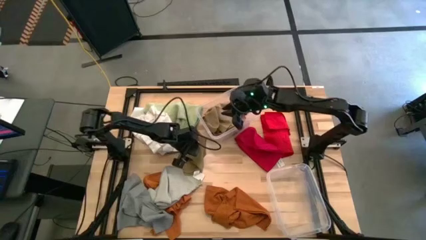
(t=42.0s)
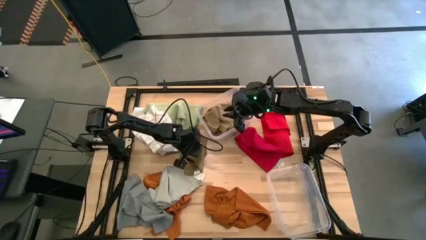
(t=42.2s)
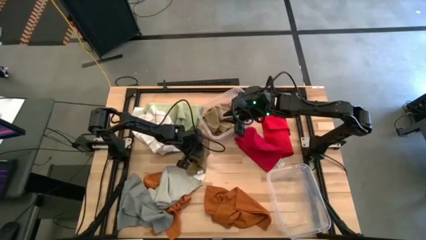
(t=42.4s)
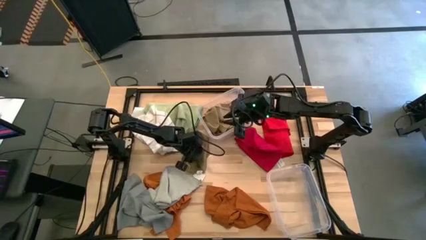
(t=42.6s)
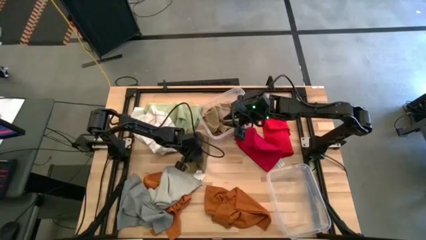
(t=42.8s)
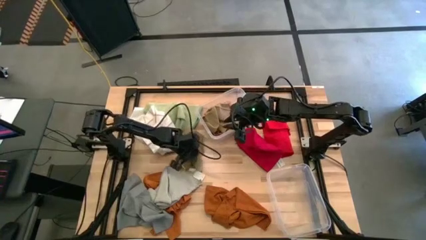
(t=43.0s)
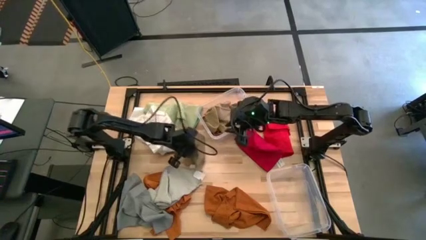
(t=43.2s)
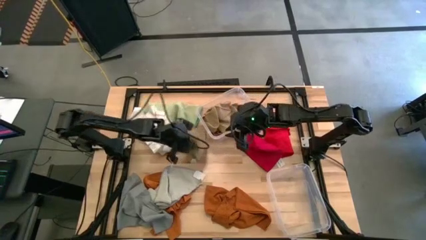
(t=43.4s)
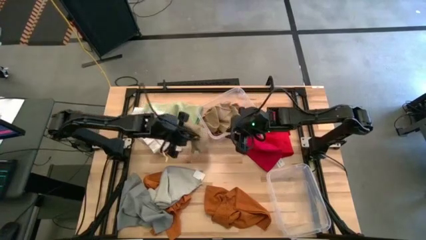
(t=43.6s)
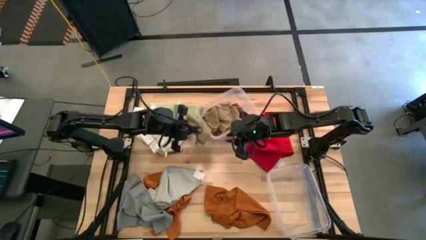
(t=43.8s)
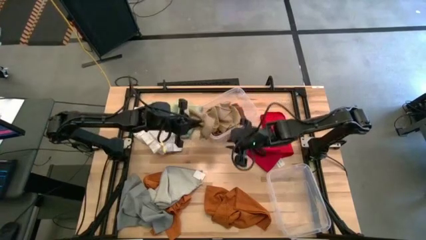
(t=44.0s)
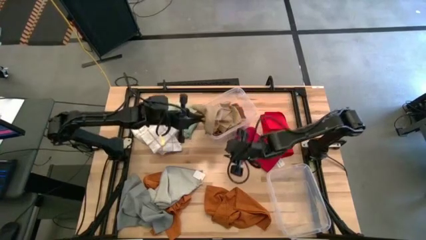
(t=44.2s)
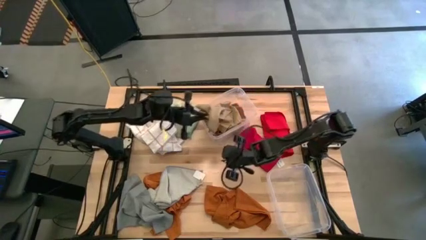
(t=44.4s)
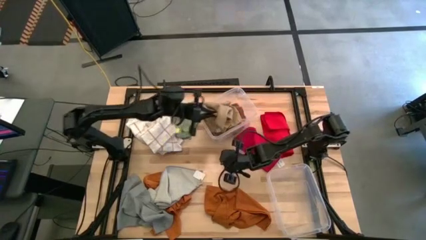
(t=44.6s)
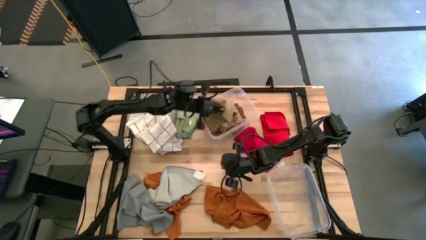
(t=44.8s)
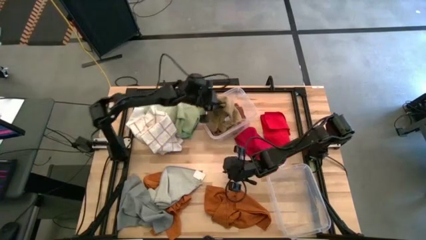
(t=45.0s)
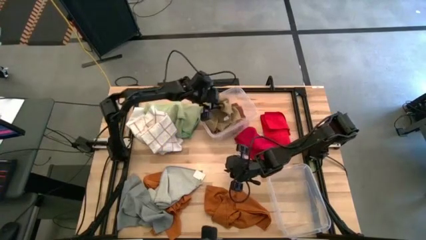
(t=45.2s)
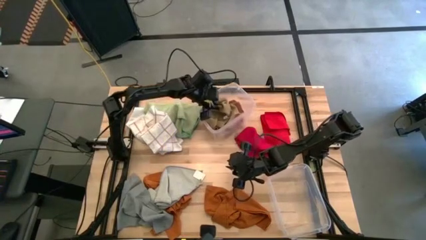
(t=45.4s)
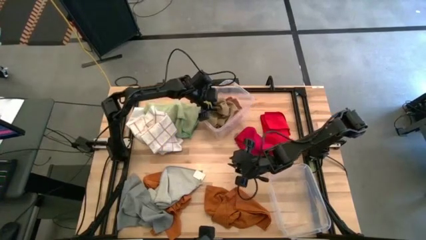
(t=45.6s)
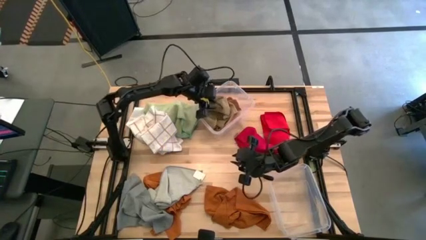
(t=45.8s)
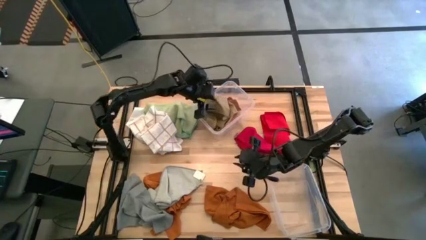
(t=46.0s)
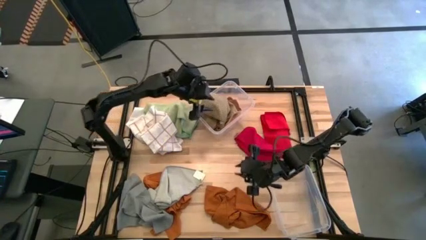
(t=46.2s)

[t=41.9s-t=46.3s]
Task: Sort towels by color in basket
Put the light brown towel into the top transparent bin

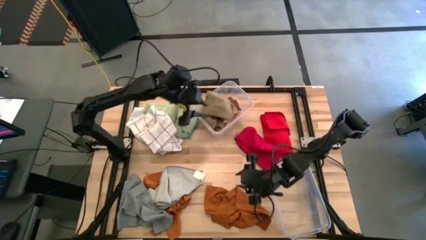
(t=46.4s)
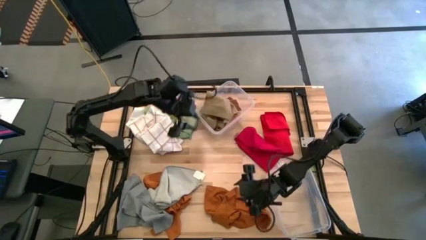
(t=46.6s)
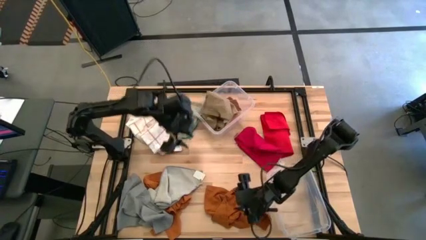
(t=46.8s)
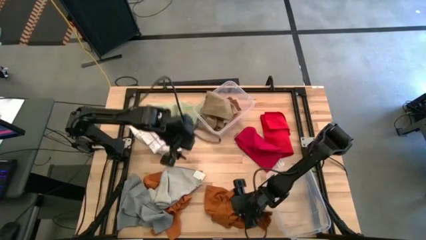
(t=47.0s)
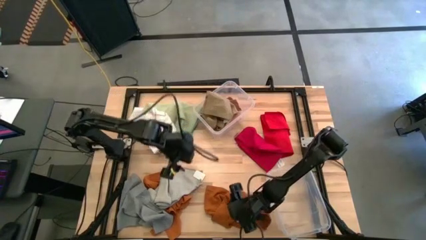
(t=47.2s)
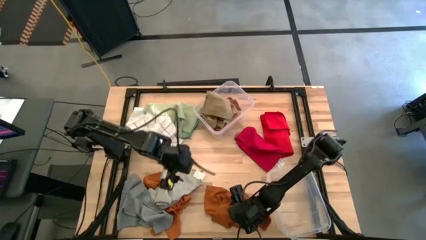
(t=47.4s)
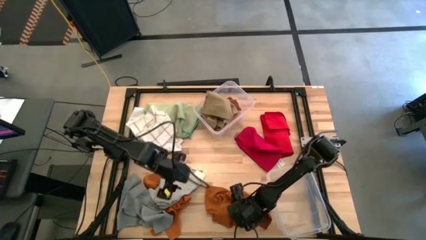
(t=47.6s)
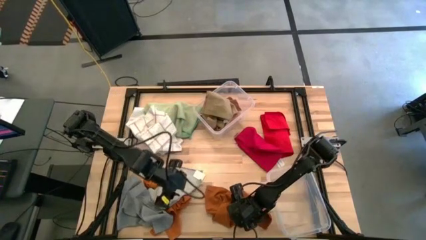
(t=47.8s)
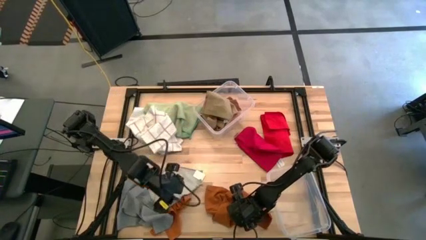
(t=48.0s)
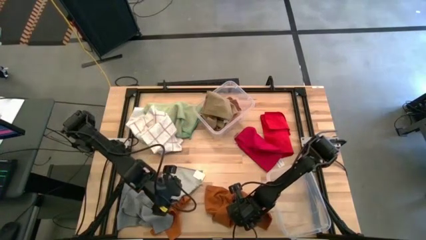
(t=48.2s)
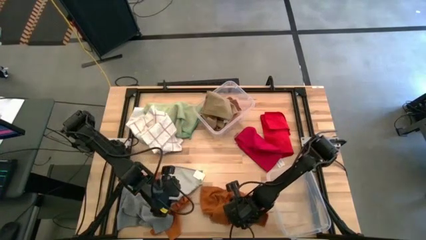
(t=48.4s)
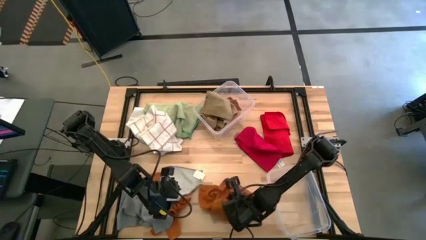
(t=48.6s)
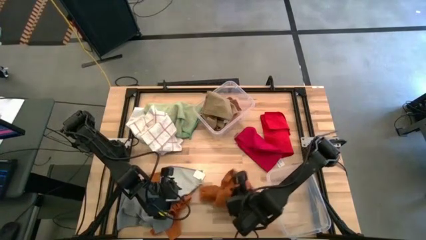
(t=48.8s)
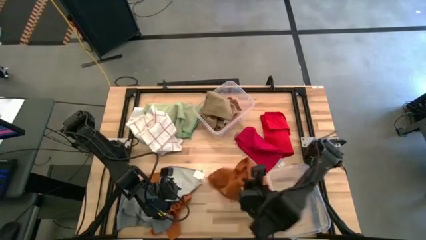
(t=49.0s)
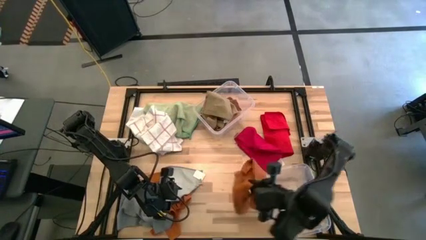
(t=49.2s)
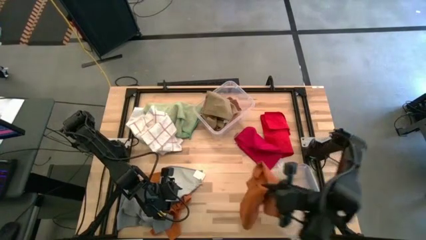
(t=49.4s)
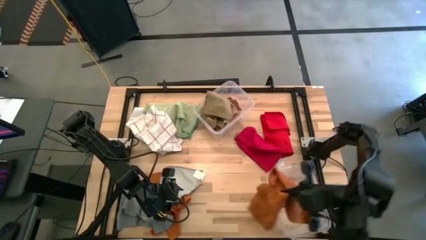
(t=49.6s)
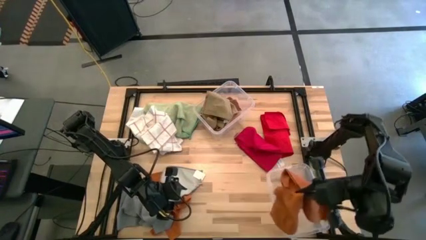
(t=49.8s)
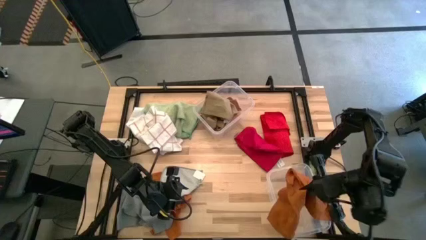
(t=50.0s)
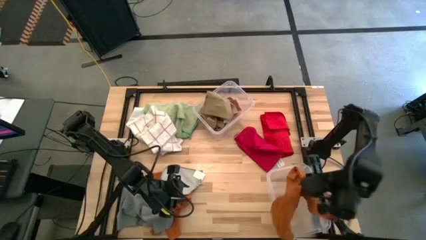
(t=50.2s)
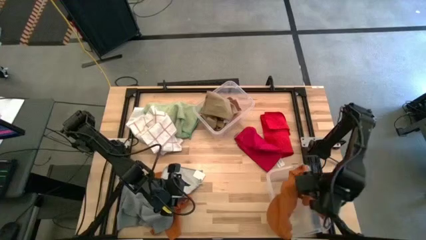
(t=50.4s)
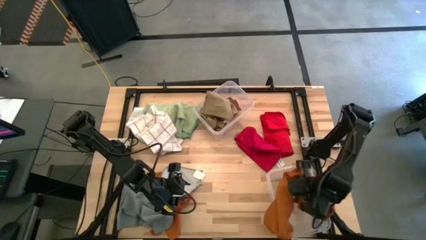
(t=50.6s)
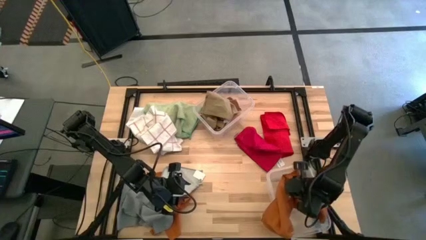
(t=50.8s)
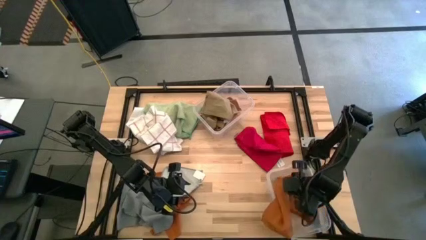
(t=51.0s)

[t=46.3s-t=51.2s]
Put the right brown towel into the bottom transparent bin

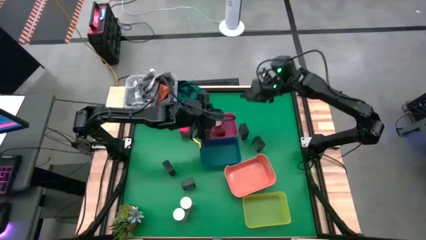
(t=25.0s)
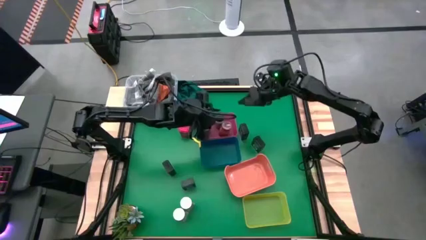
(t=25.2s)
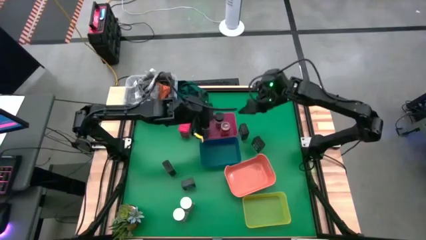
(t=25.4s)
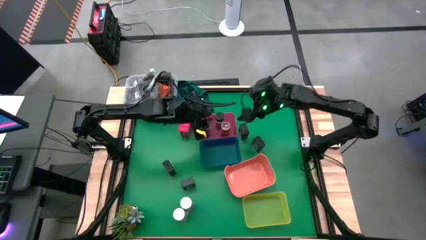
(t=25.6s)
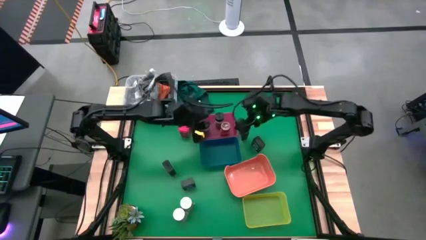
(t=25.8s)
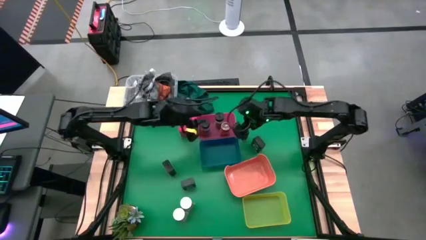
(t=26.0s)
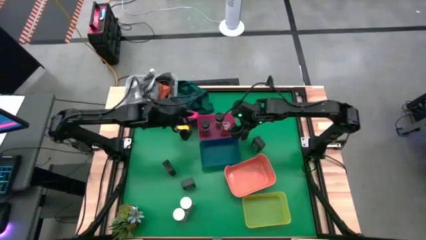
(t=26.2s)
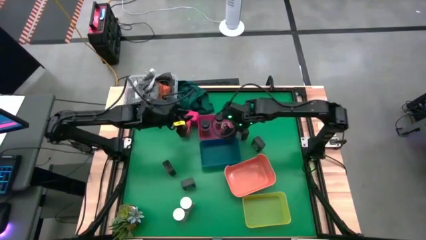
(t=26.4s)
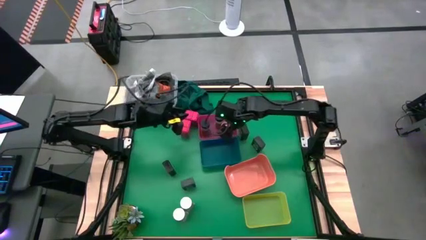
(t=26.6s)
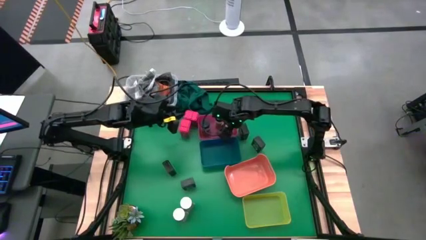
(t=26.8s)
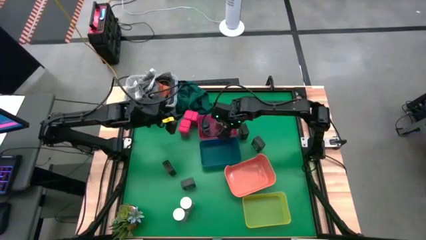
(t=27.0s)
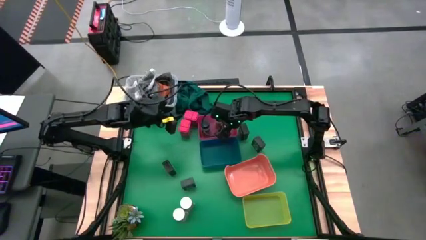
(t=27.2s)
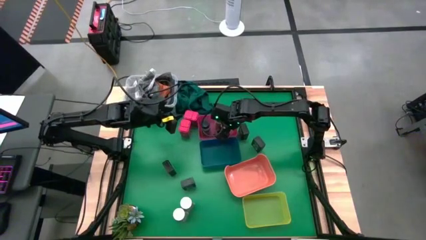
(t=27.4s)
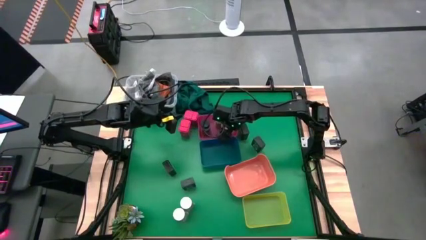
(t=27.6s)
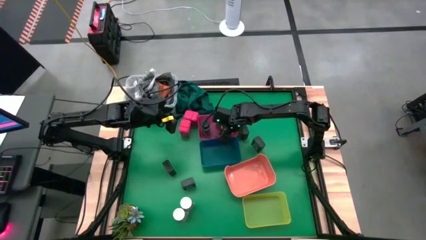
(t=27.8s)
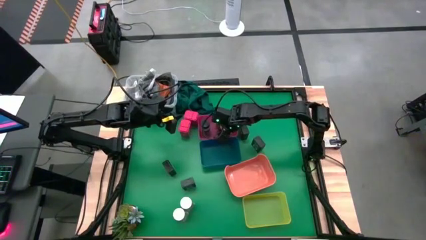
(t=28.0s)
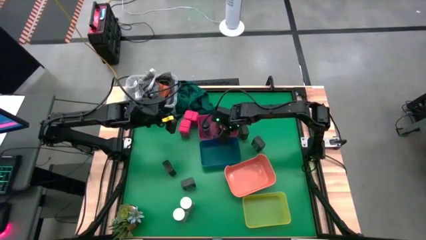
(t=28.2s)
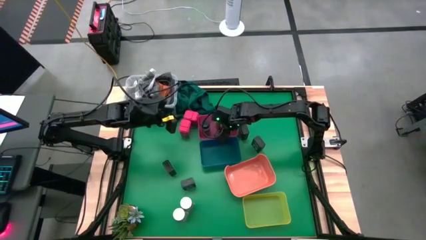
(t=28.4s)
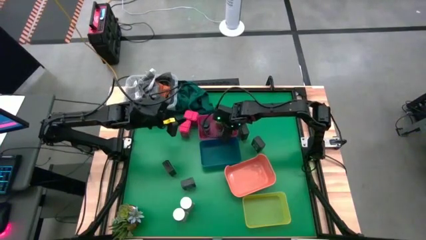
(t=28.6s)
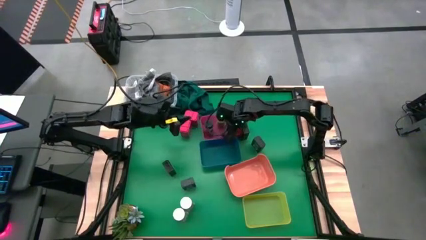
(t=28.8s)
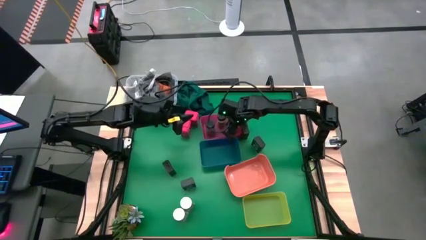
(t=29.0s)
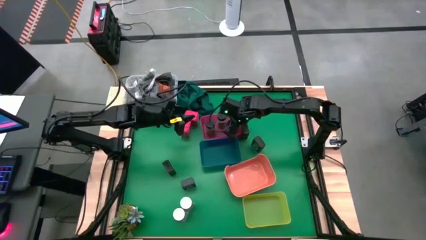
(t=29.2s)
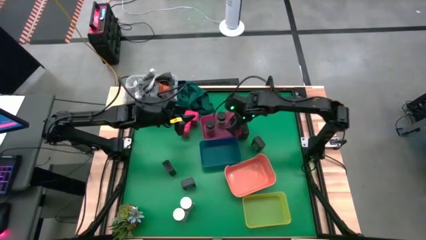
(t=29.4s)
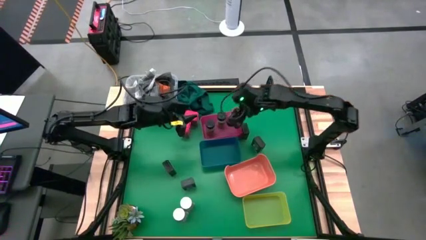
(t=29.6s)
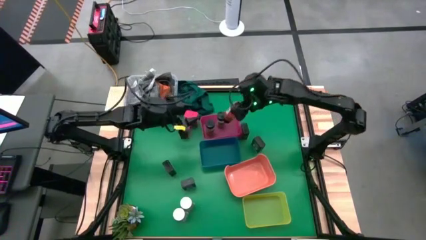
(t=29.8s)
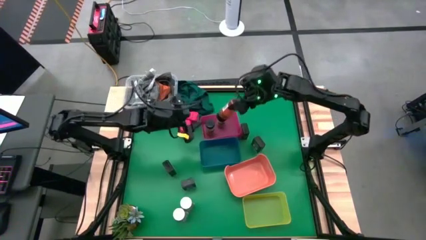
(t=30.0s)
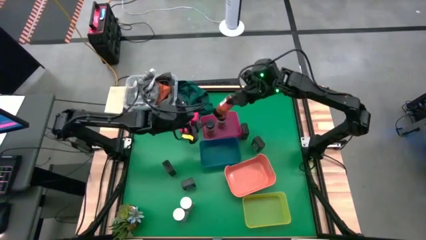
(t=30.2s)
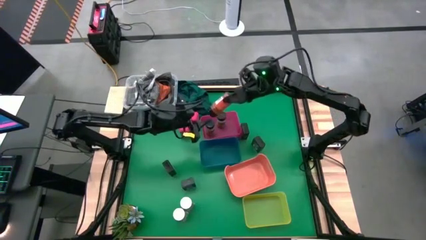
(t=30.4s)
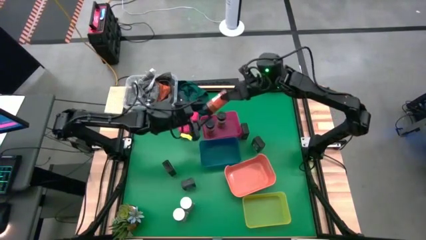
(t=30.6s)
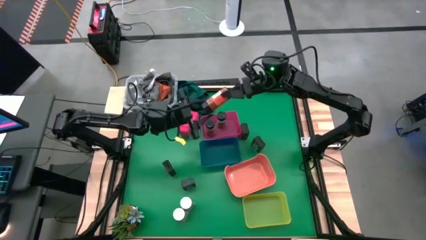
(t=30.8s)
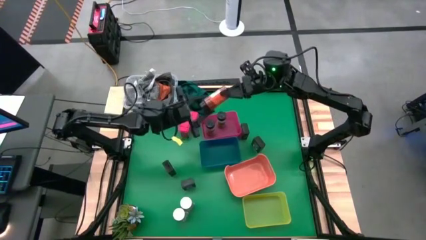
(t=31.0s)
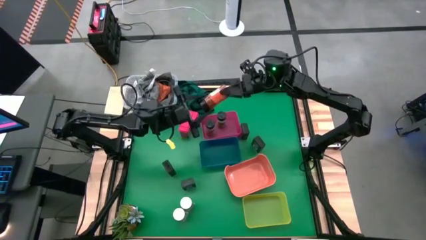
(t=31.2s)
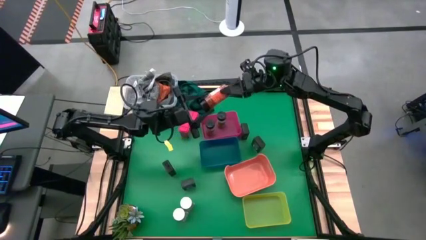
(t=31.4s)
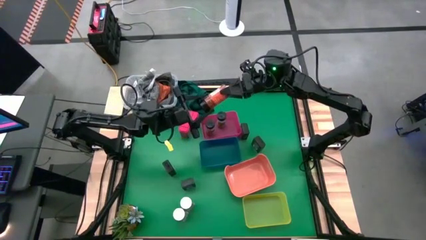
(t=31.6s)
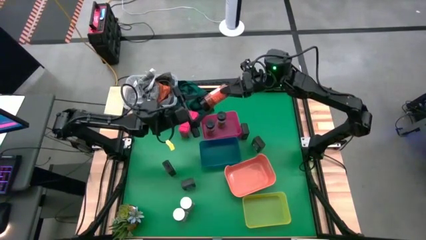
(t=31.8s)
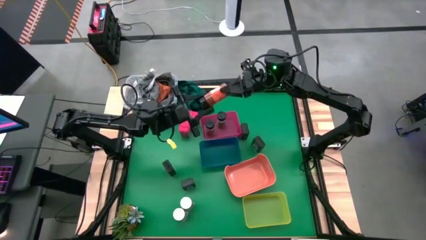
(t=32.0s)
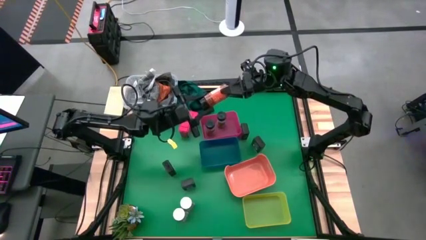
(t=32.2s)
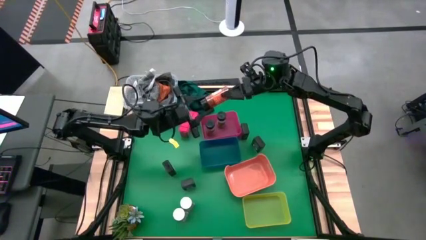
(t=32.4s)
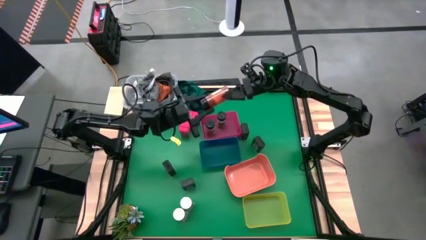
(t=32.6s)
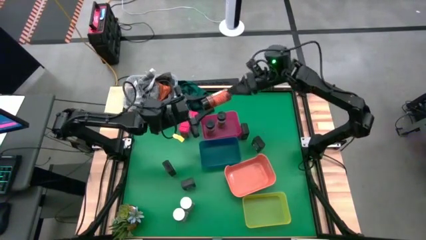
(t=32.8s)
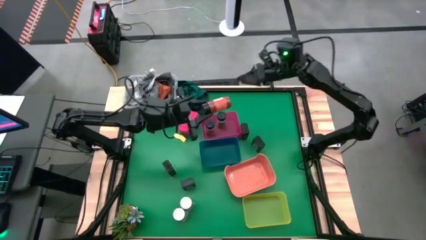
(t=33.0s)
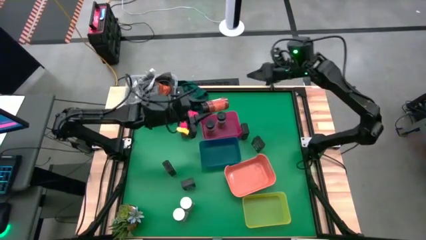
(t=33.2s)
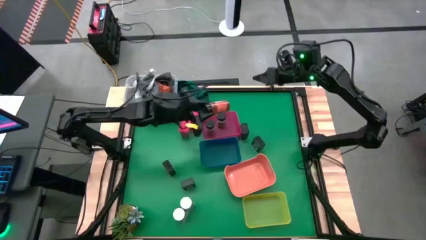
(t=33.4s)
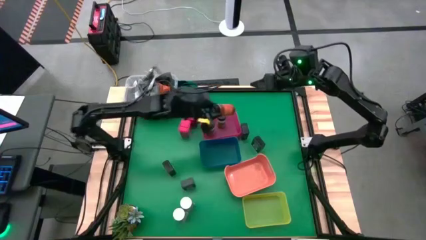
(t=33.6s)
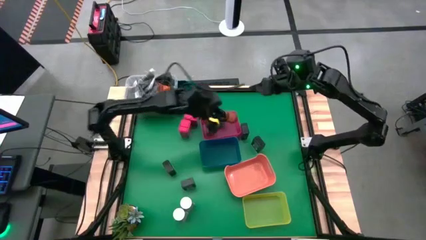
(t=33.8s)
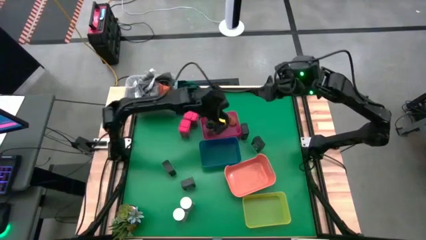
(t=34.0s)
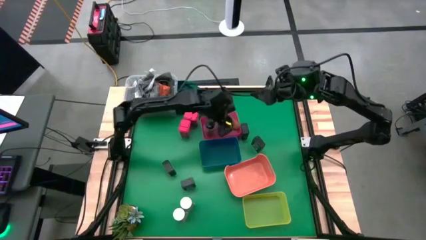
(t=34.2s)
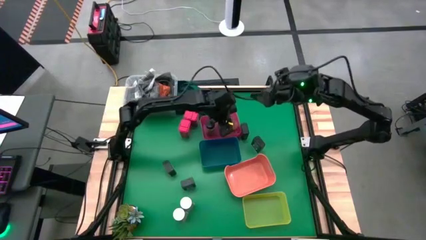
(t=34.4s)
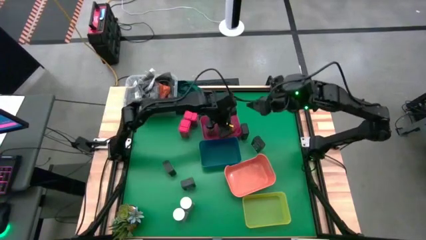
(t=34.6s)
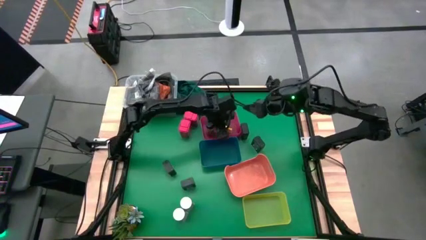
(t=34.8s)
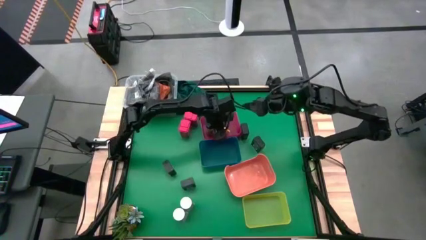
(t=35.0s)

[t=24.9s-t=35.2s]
Task: Sort spices by type
Adjust the black seasoning bottle in the pink bin
